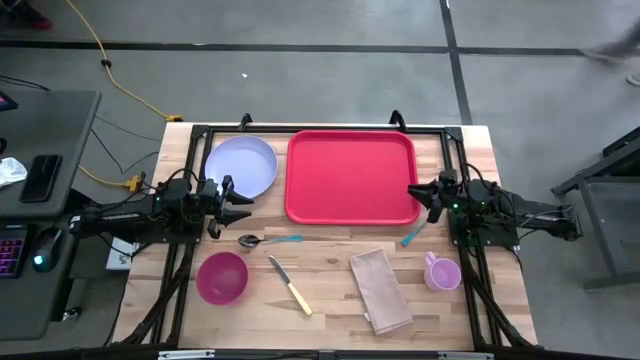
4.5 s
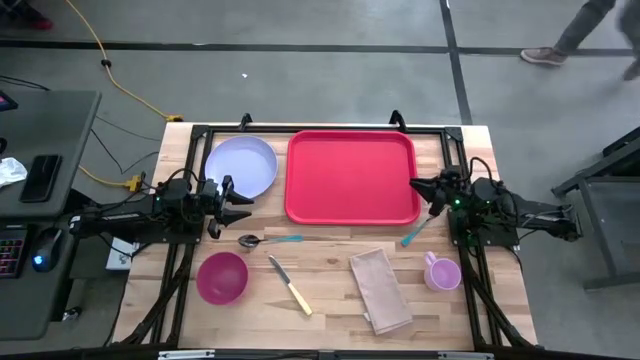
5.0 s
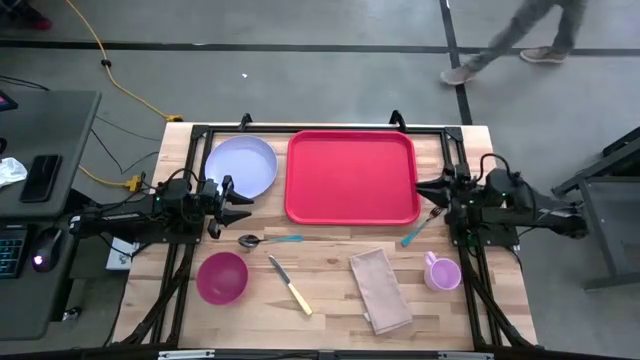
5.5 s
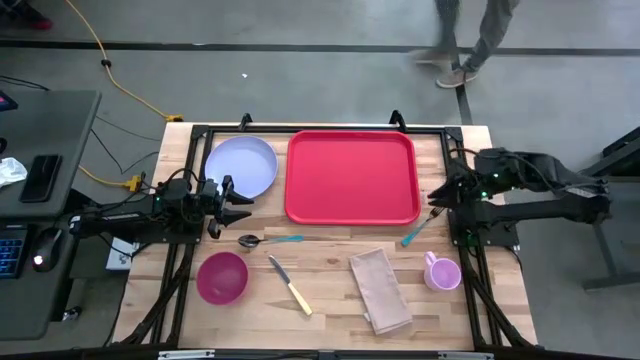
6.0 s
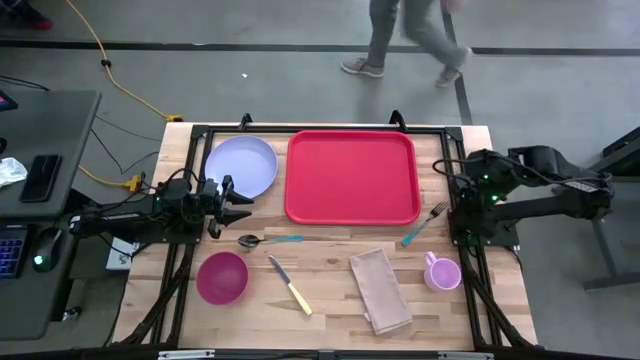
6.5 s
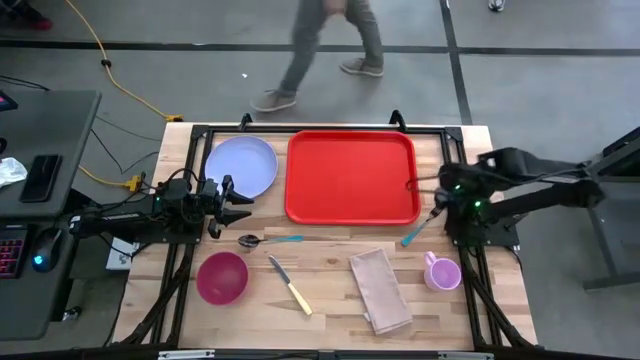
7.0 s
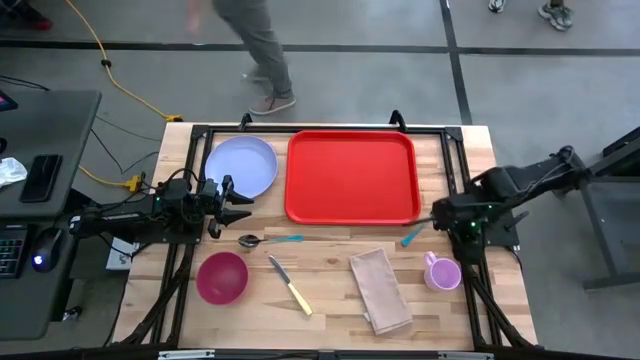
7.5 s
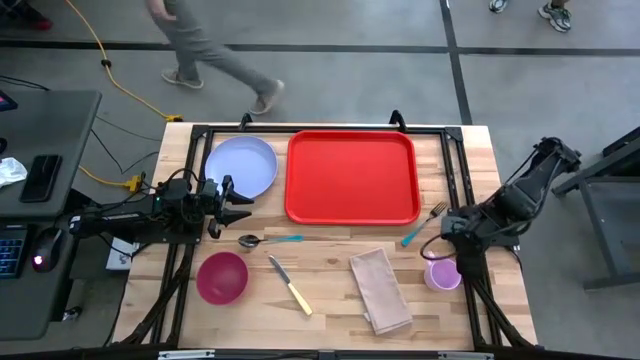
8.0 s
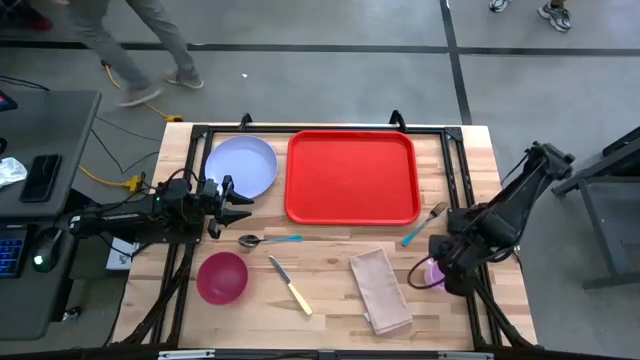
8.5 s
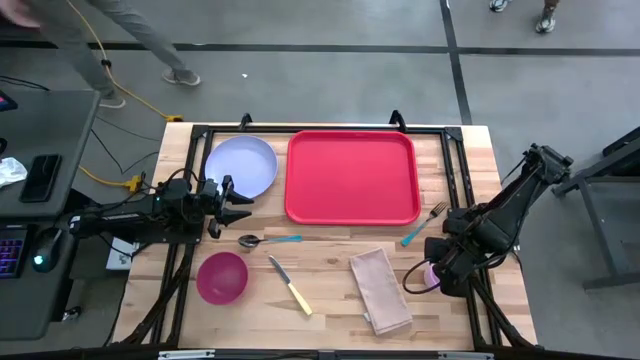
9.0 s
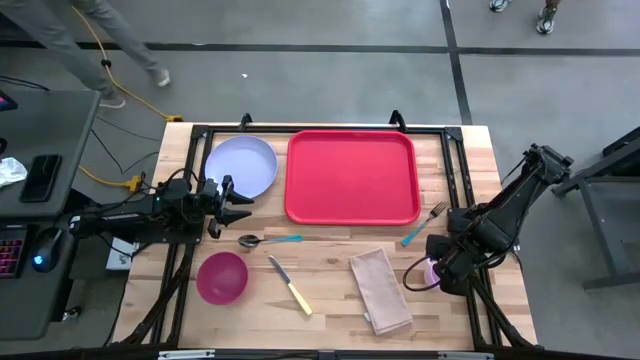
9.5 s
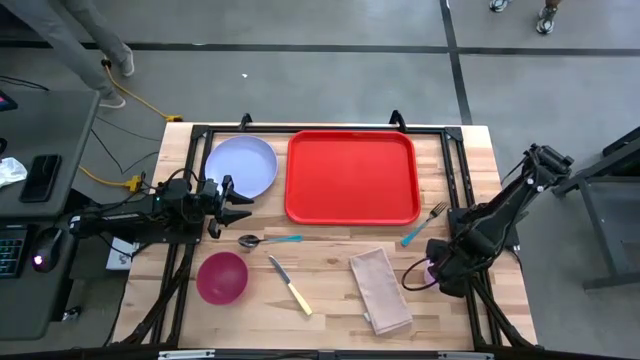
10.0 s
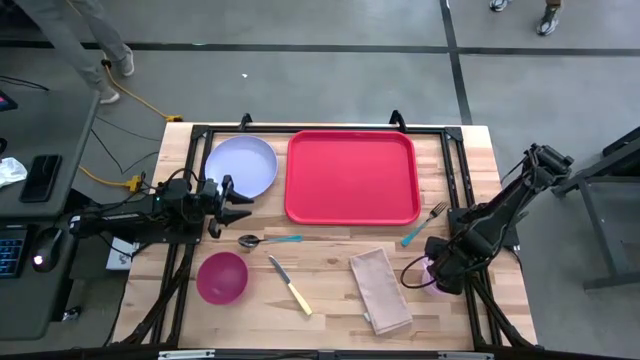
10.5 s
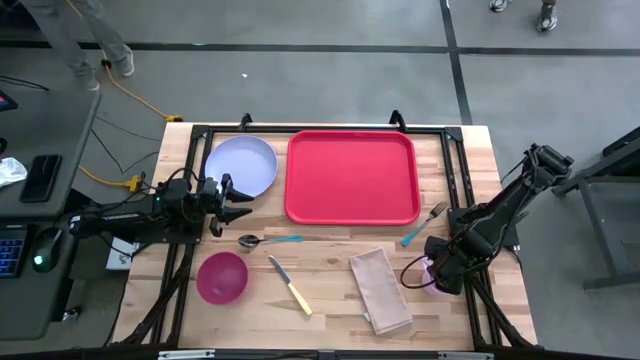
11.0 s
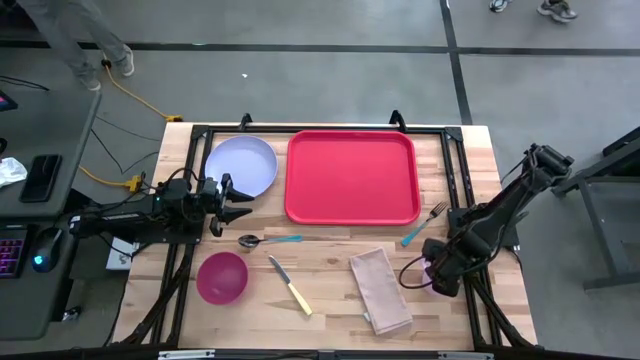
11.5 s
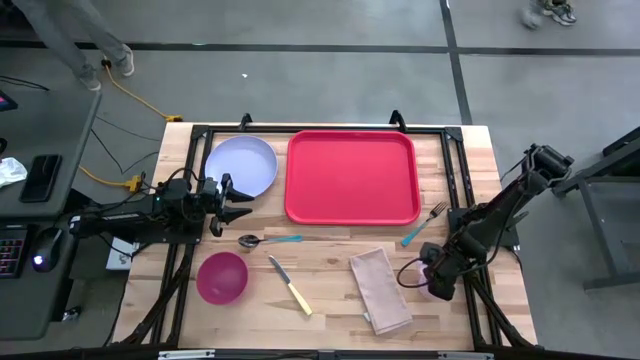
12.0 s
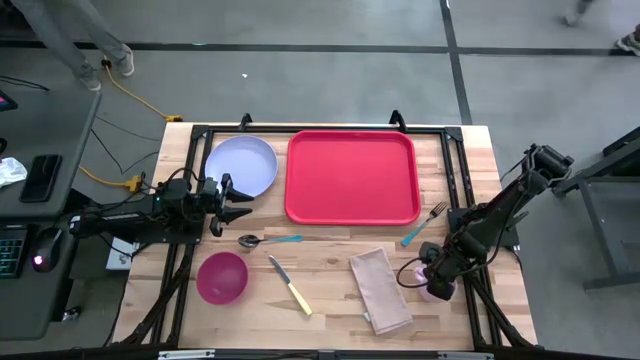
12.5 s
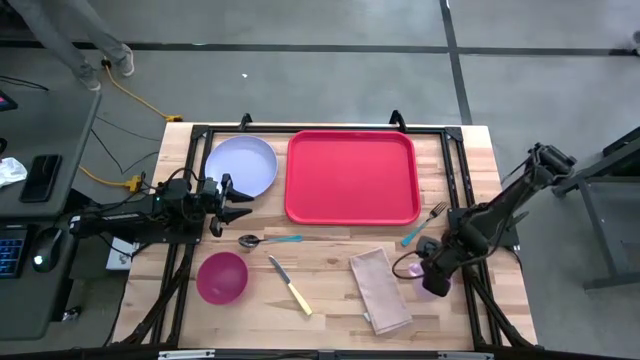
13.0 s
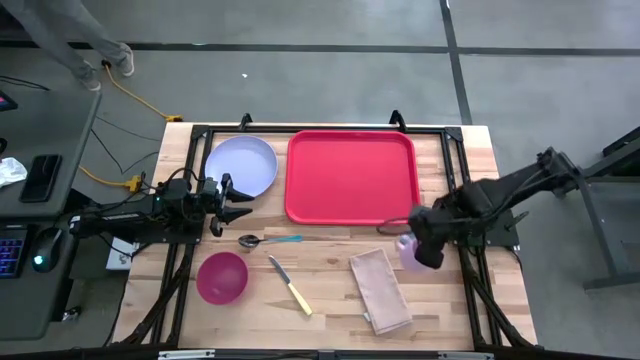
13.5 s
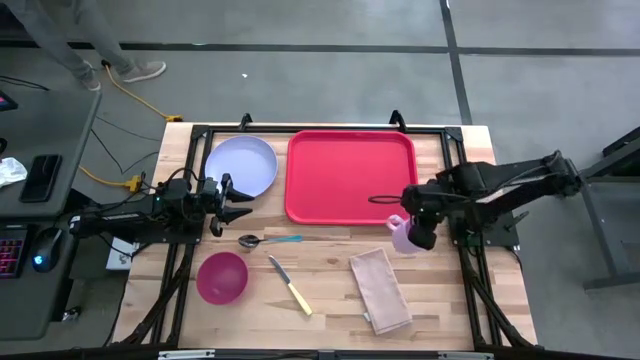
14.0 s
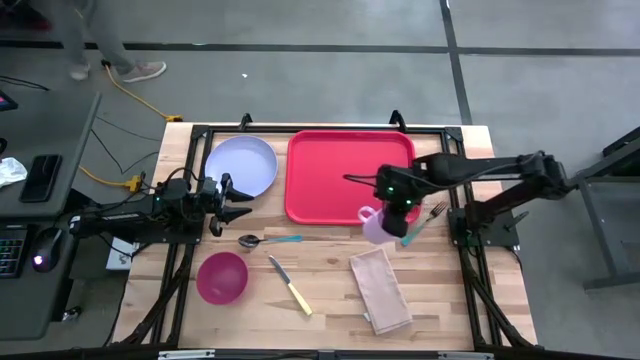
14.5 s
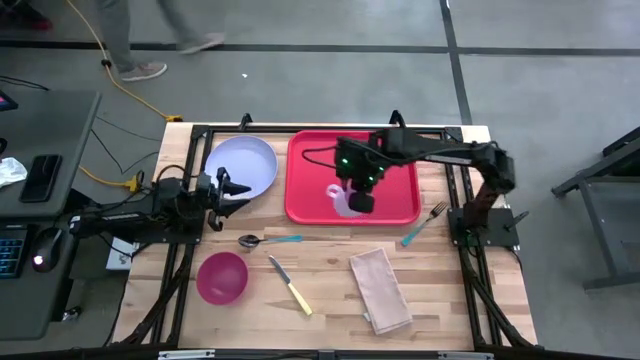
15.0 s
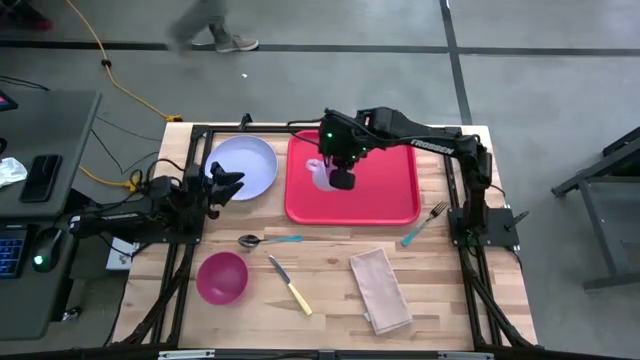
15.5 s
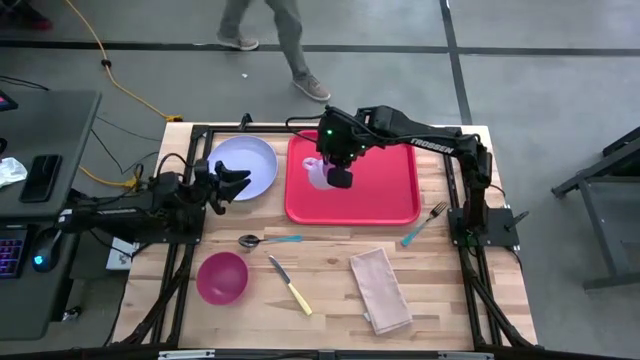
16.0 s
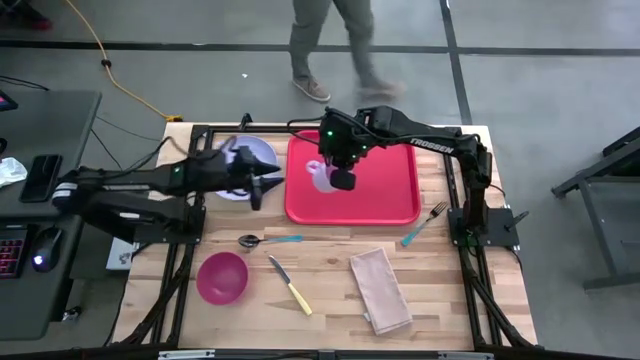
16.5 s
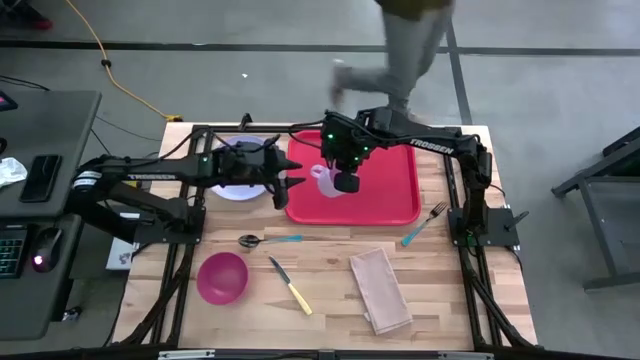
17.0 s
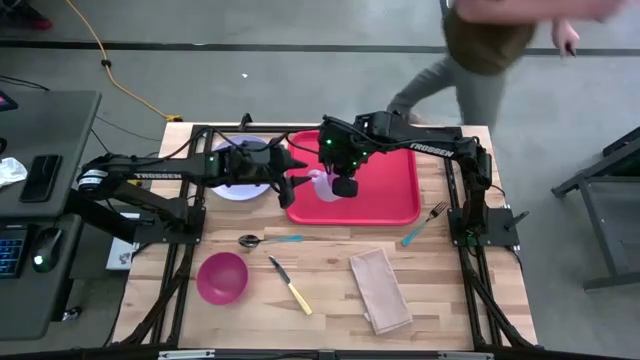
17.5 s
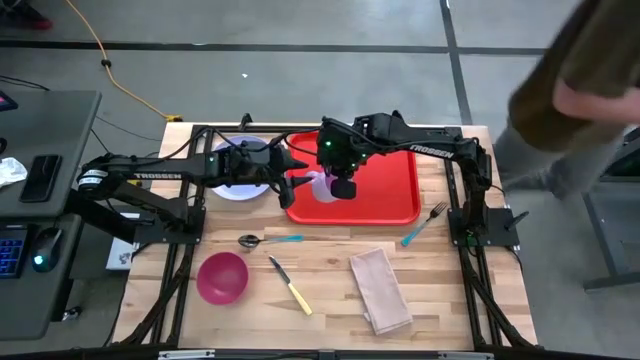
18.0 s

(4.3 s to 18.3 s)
Task: Set up tray
Put the pink mug on the red tray
